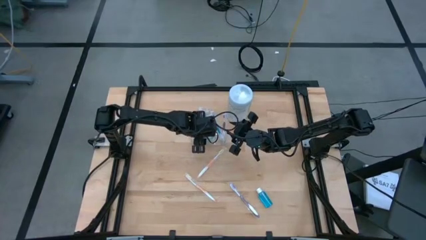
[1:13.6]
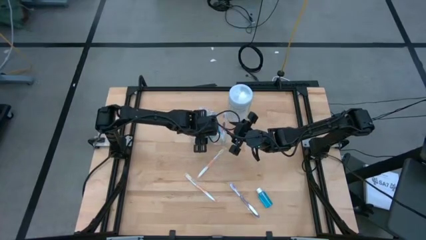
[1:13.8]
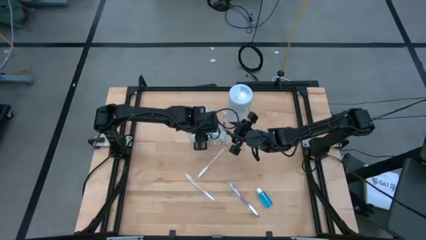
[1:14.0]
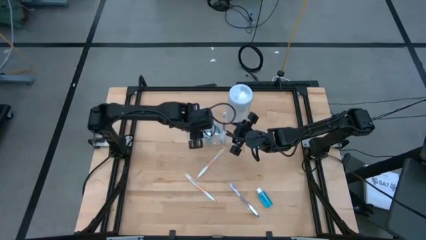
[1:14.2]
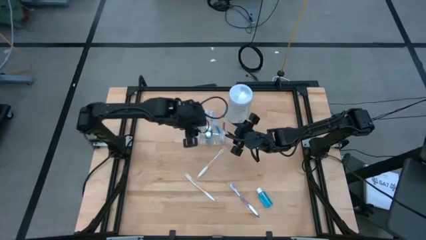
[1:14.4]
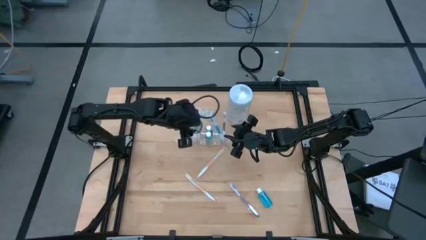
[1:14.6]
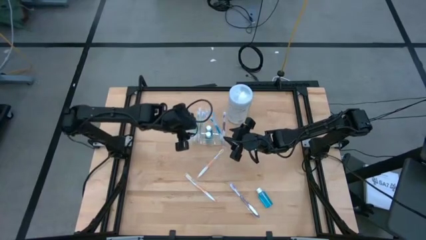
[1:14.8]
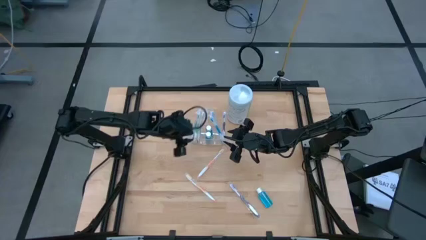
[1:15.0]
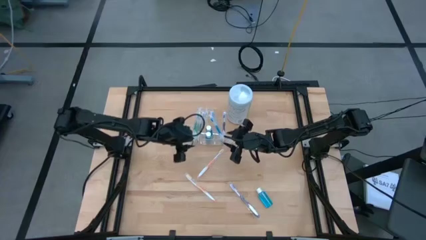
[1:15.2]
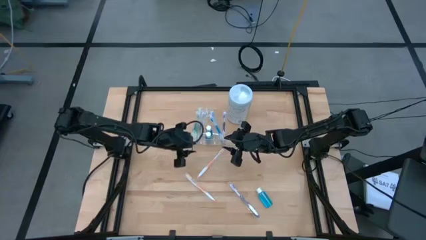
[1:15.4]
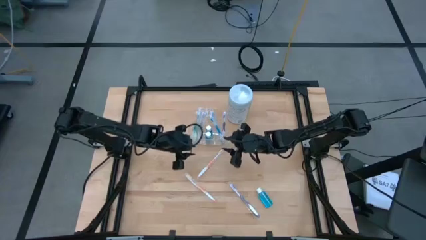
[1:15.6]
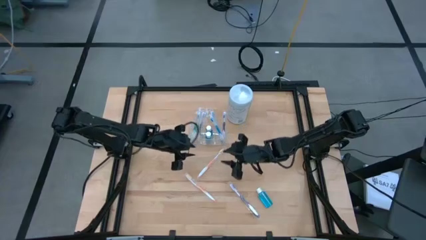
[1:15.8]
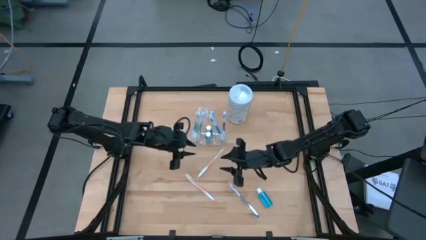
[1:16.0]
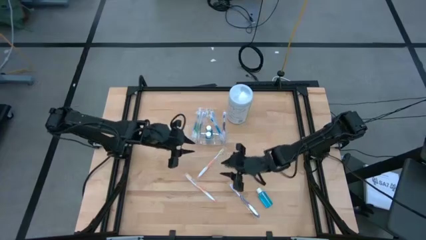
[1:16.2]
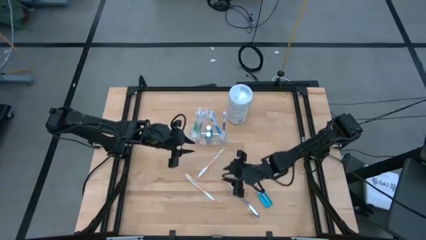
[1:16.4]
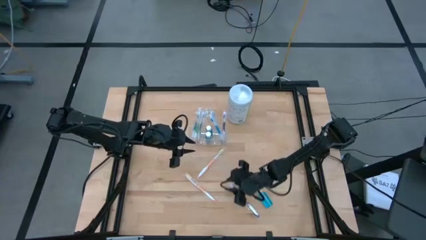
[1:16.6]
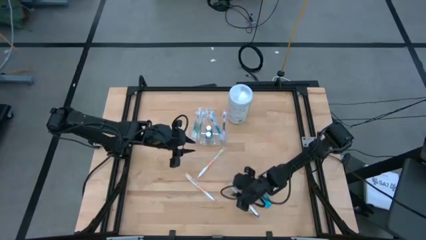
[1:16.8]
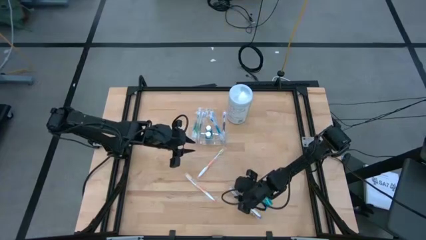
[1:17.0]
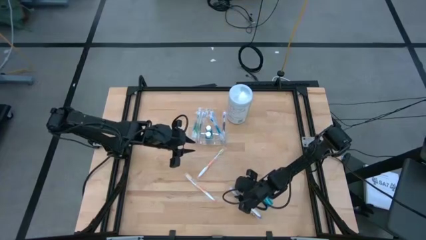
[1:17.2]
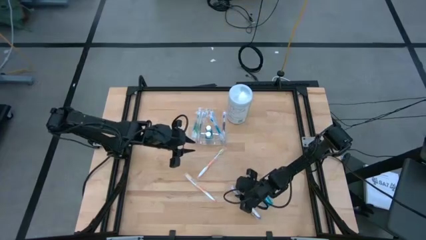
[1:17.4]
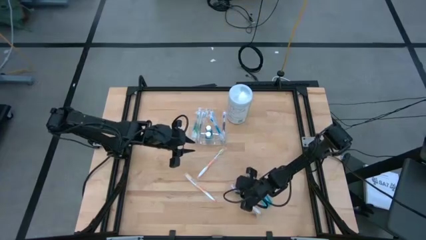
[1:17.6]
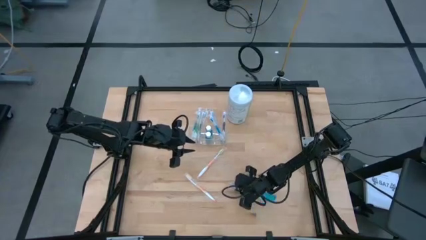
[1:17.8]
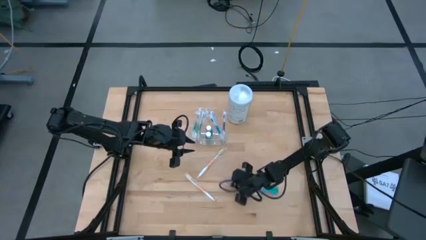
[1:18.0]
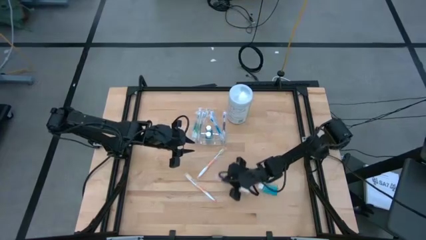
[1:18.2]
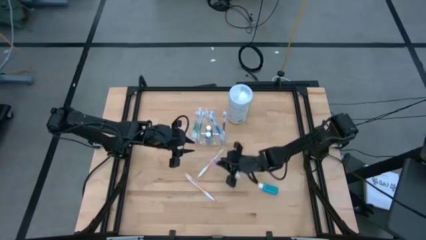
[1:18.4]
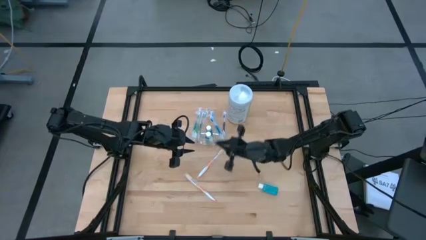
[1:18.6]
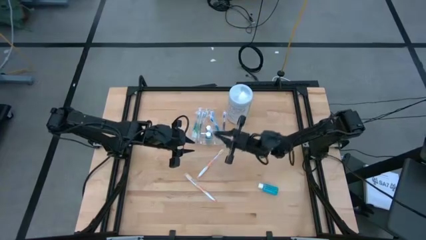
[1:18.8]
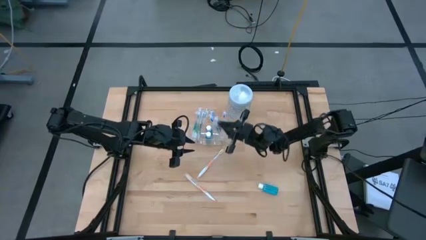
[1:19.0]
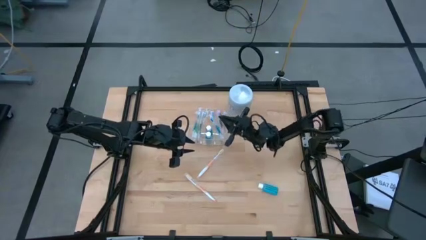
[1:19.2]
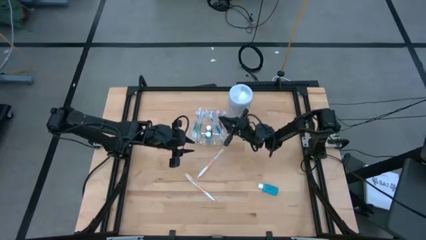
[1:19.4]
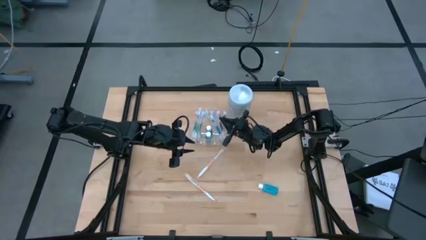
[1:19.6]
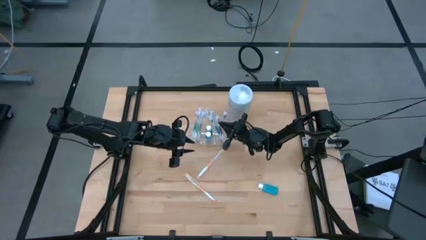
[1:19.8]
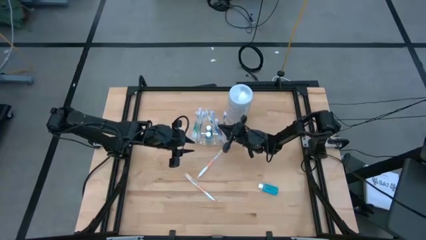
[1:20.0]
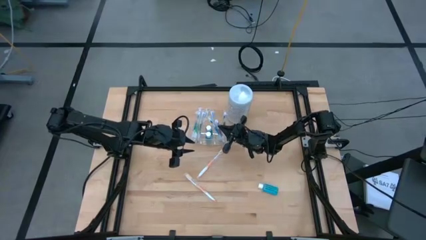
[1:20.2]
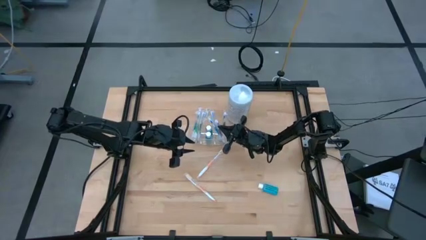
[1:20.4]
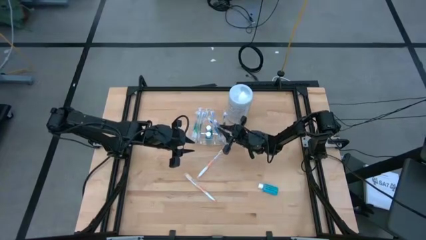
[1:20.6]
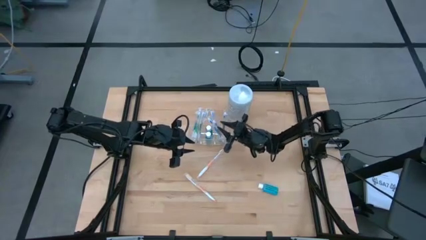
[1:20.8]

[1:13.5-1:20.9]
Task: Pick & Place toothbrushing station
Put the violet toothbrush into the transparent organizer

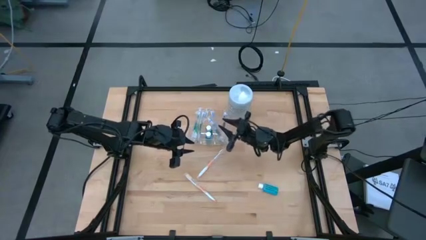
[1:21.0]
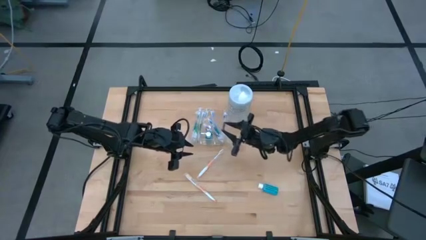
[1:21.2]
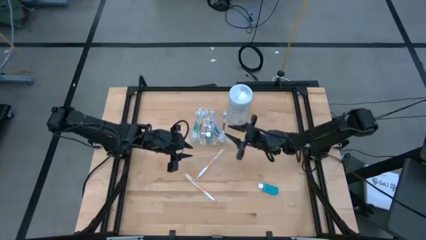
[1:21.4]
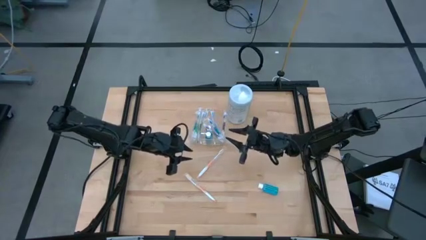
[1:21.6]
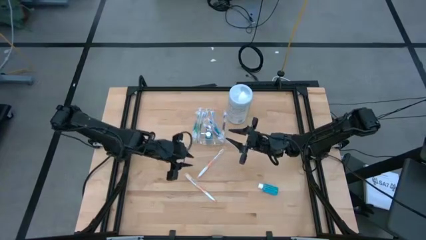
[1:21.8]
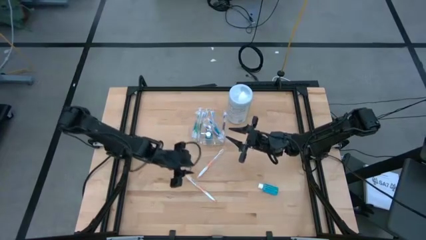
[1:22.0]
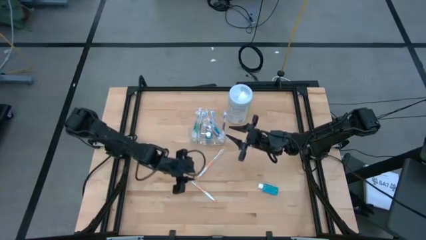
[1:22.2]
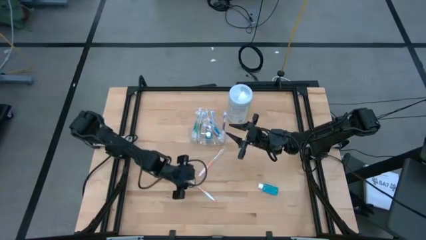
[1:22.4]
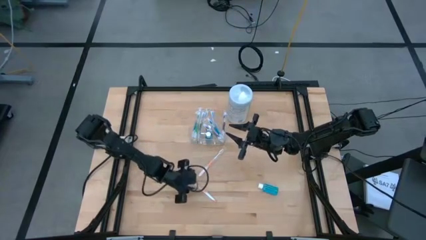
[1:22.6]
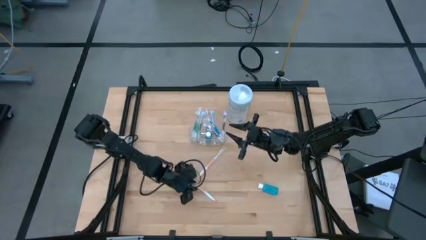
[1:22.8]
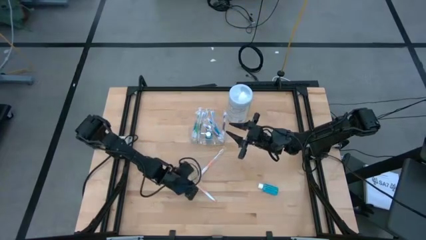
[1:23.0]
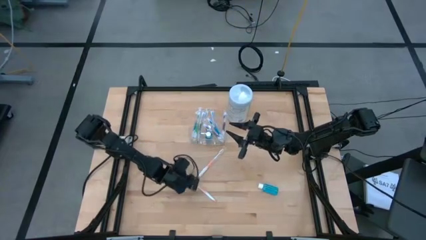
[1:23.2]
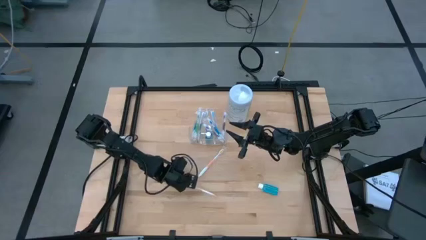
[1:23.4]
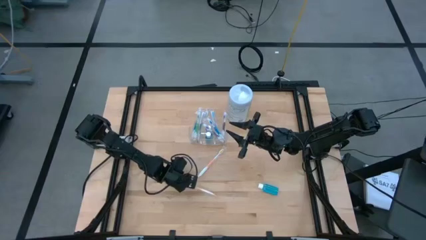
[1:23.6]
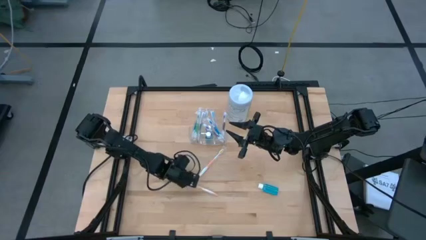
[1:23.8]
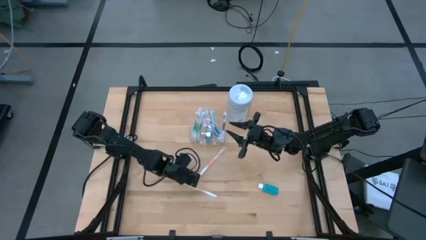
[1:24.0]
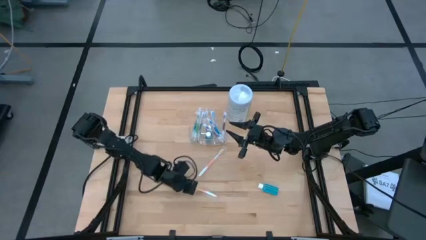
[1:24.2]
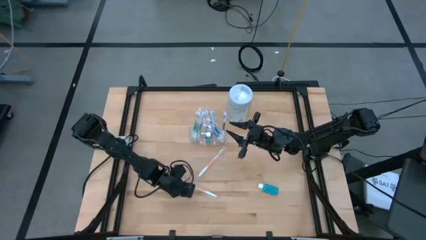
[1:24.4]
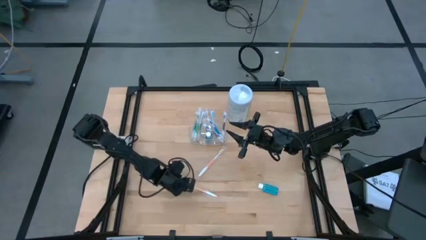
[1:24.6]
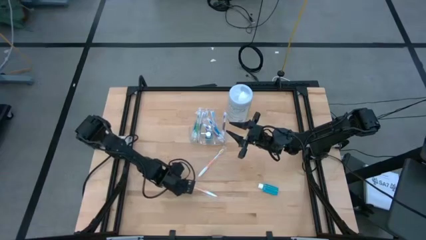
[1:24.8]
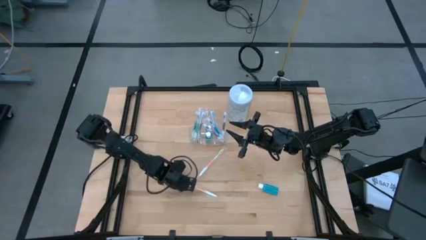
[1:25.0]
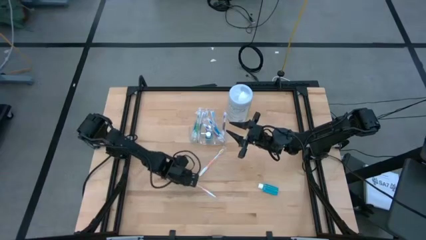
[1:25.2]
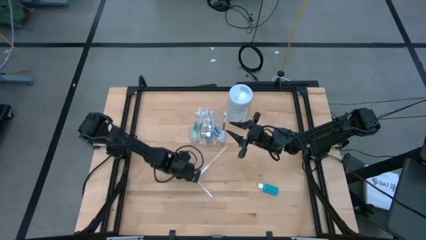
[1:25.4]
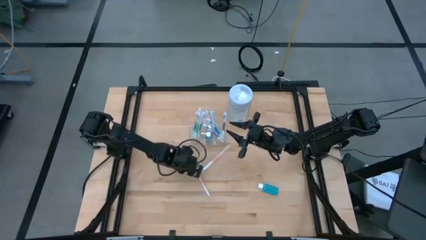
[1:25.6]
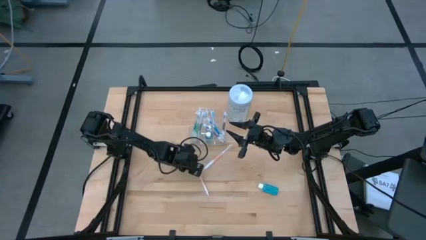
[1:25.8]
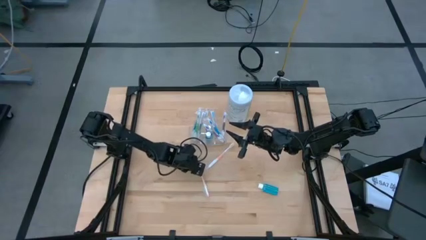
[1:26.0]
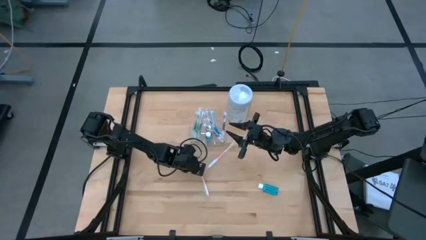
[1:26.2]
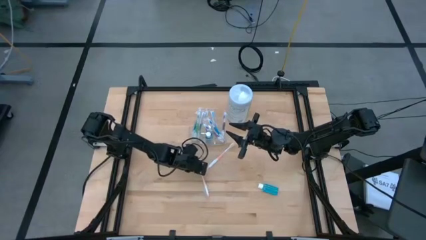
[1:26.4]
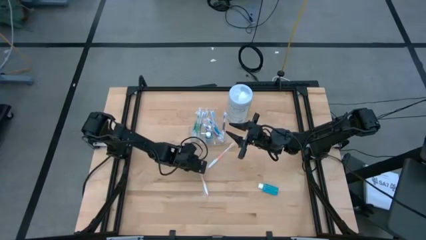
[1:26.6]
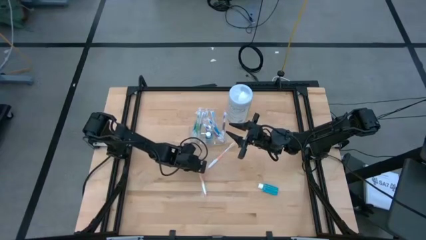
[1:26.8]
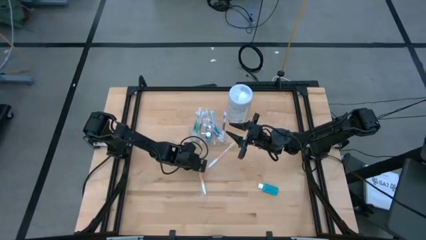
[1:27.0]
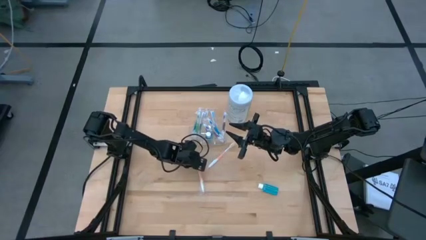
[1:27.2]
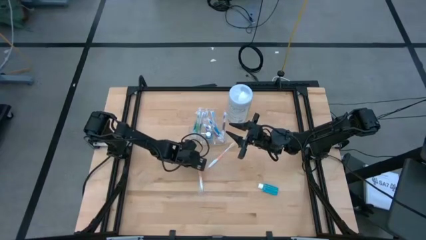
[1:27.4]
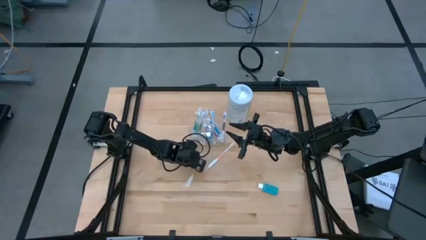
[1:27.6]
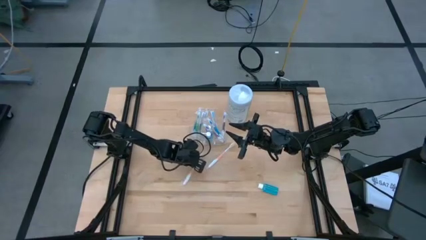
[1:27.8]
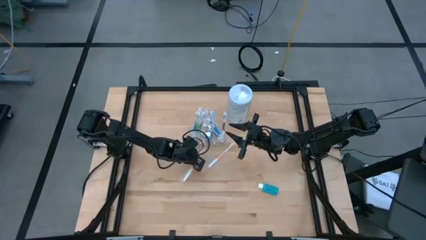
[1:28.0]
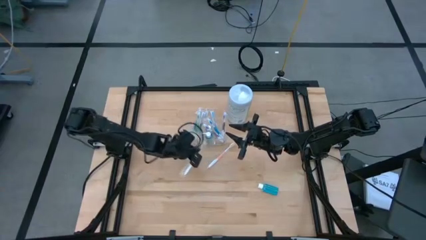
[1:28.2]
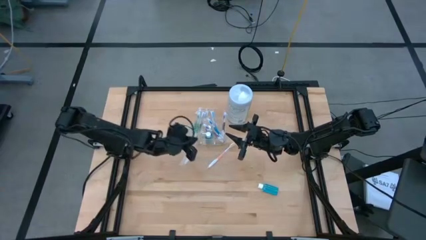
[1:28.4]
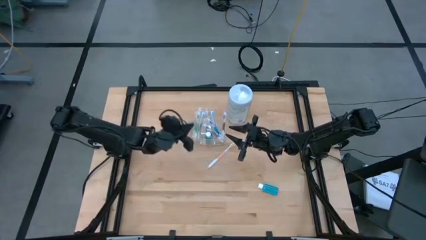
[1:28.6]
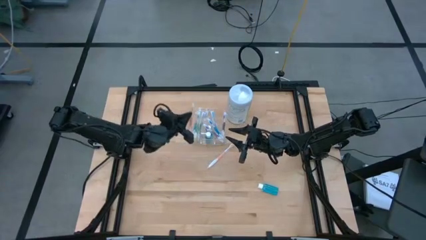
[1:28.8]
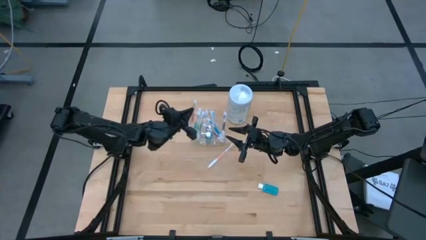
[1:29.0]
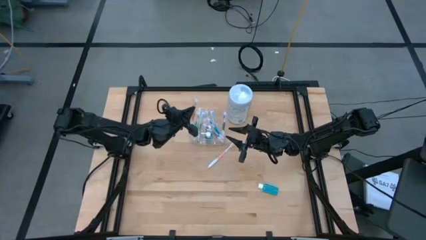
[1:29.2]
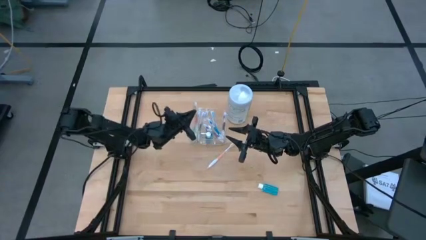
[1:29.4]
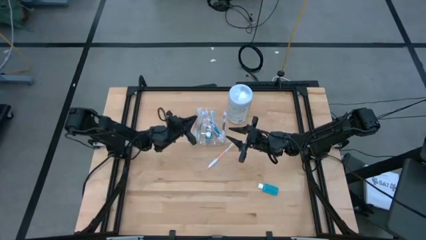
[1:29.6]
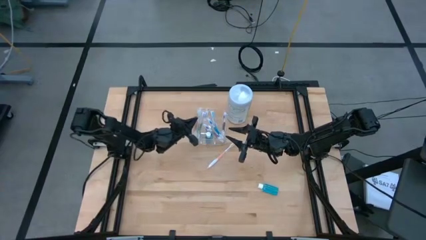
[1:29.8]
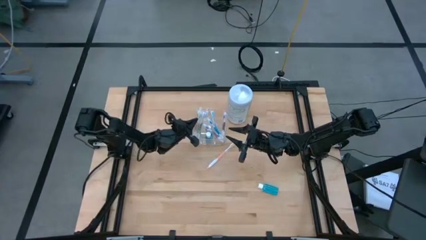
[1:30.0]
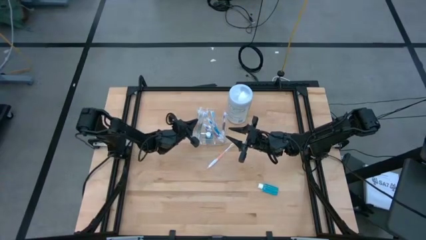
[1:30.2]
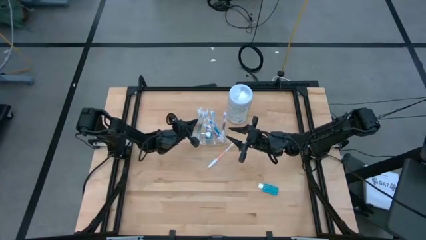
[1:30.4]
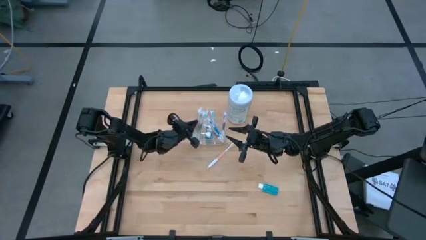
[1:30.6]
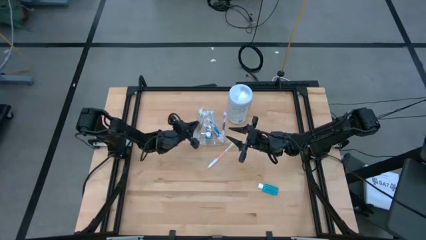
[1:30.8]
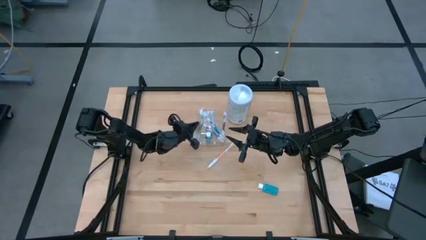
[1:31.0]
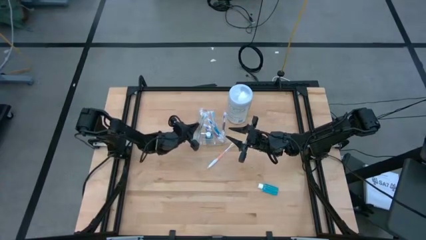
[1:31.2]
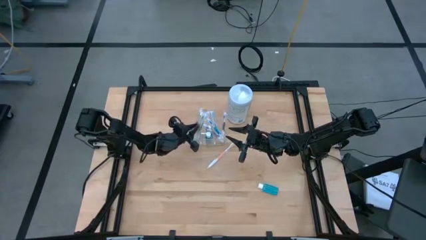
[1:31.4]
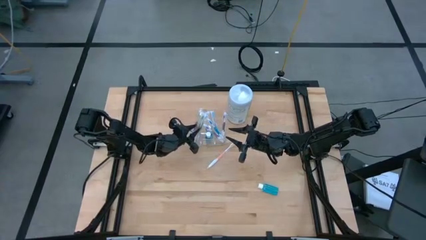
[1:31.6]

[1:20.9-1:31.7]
Put the bottom orange toothbrush into the transparent organizer
